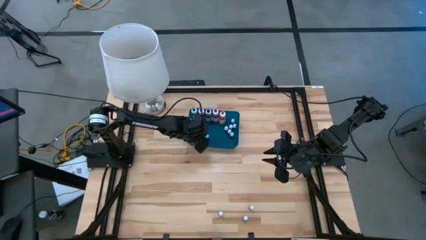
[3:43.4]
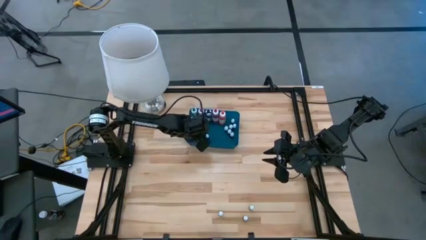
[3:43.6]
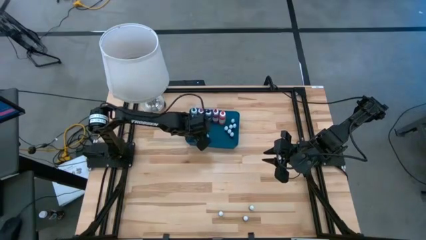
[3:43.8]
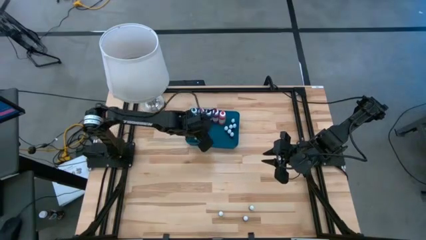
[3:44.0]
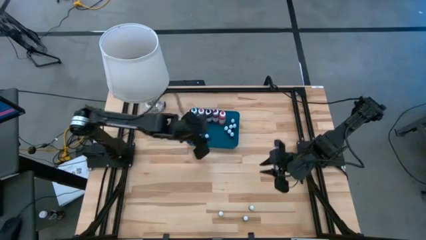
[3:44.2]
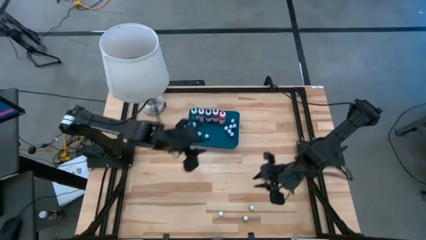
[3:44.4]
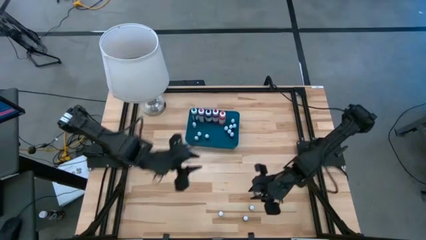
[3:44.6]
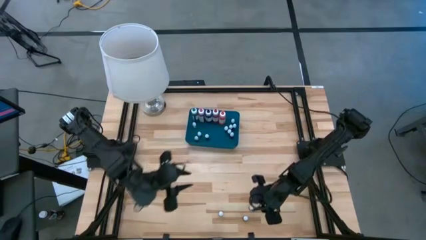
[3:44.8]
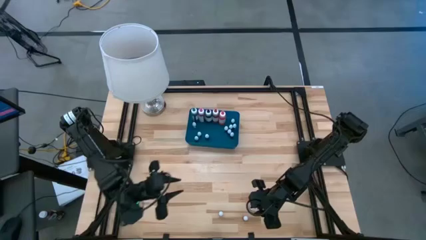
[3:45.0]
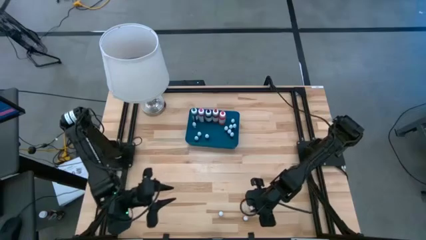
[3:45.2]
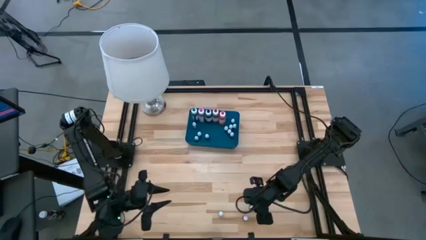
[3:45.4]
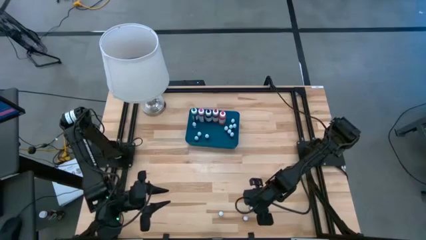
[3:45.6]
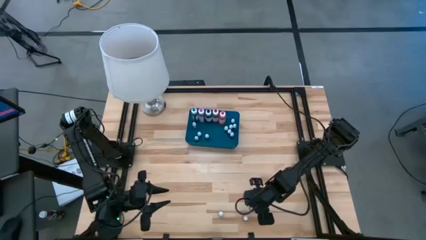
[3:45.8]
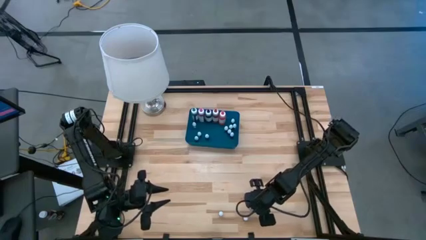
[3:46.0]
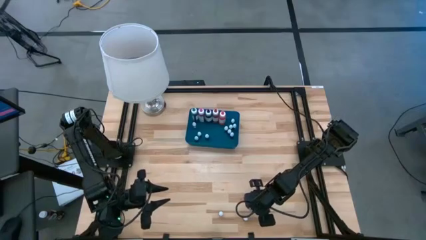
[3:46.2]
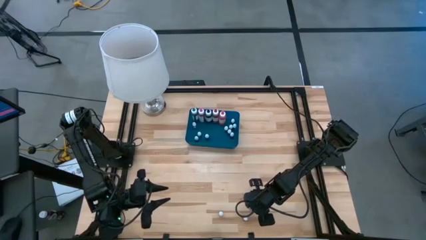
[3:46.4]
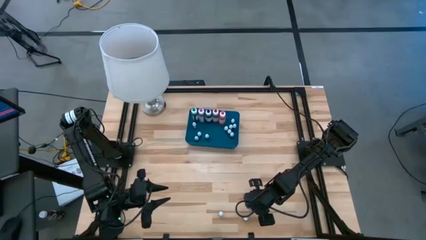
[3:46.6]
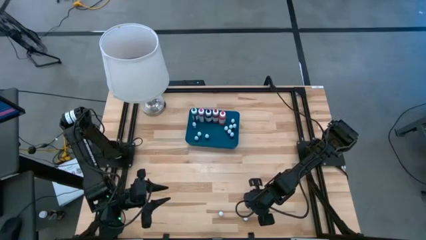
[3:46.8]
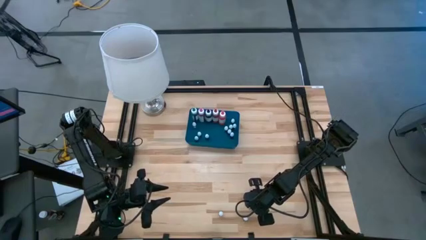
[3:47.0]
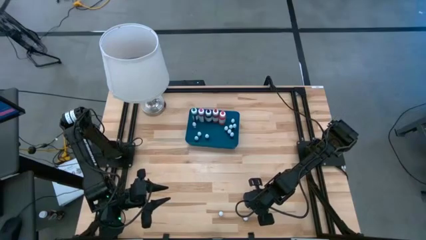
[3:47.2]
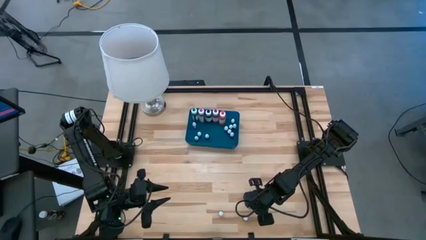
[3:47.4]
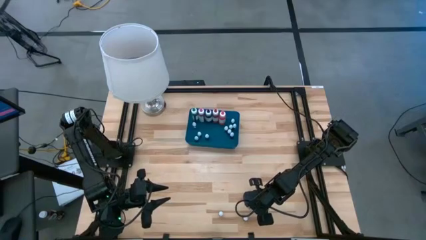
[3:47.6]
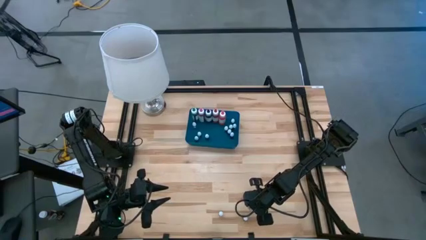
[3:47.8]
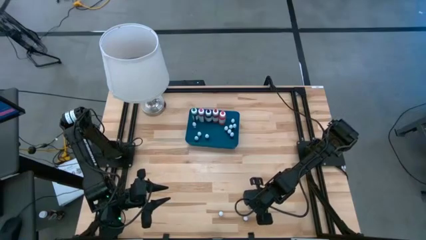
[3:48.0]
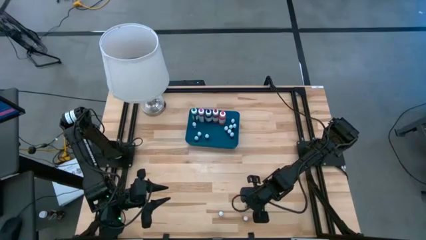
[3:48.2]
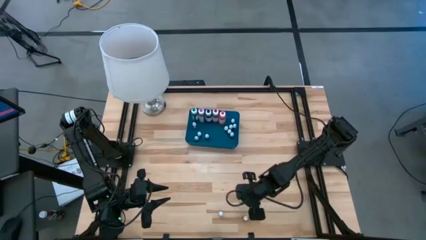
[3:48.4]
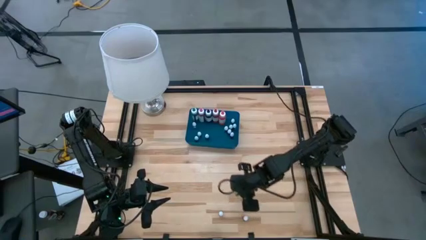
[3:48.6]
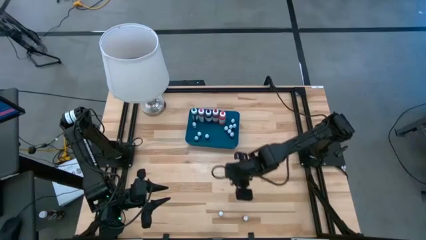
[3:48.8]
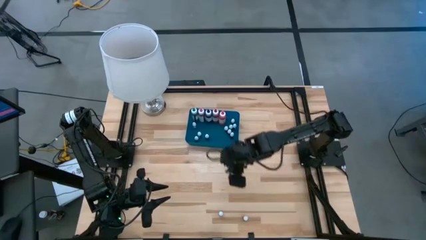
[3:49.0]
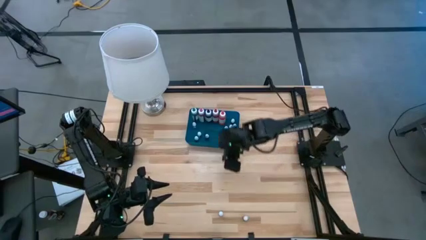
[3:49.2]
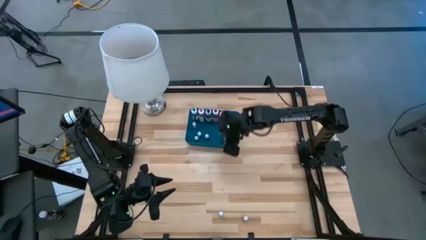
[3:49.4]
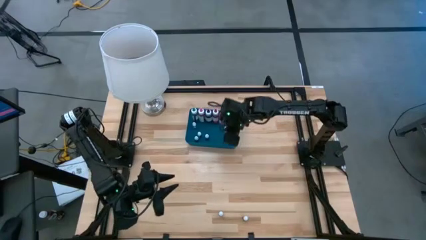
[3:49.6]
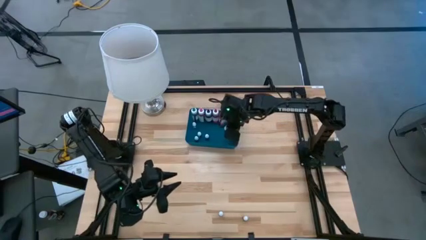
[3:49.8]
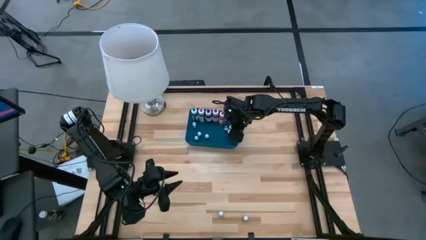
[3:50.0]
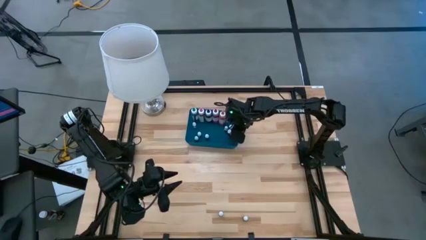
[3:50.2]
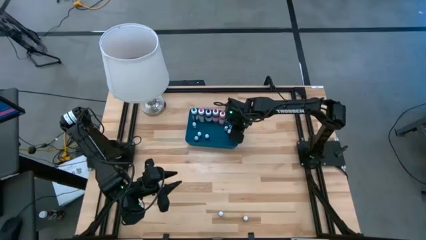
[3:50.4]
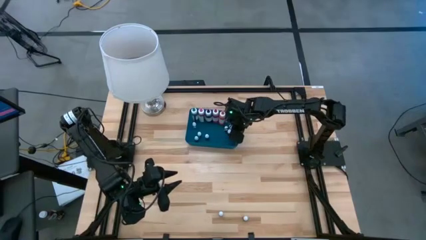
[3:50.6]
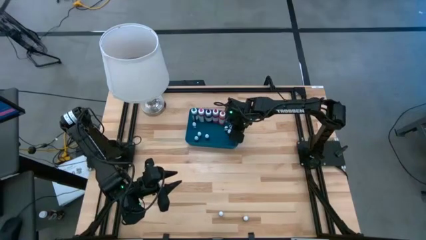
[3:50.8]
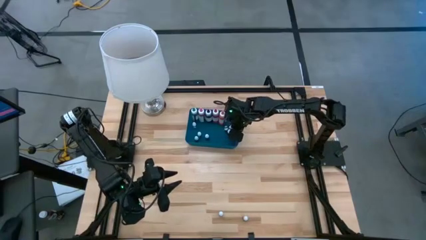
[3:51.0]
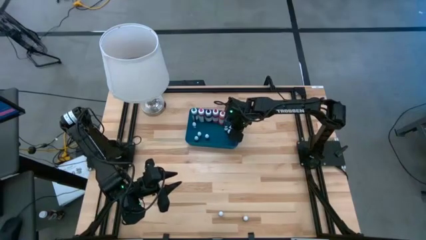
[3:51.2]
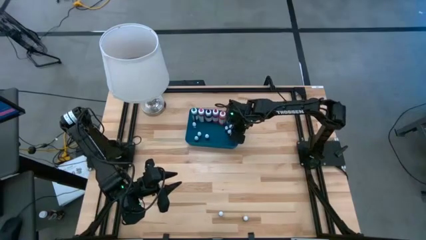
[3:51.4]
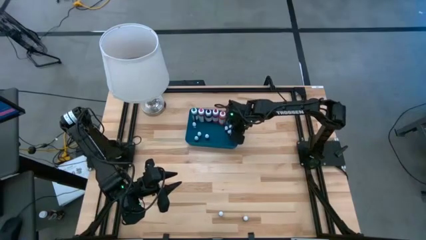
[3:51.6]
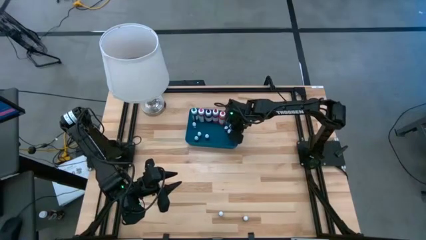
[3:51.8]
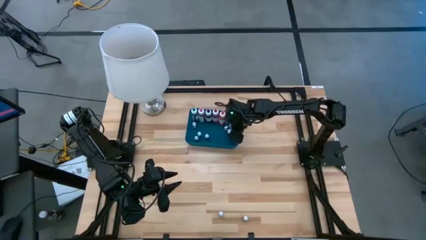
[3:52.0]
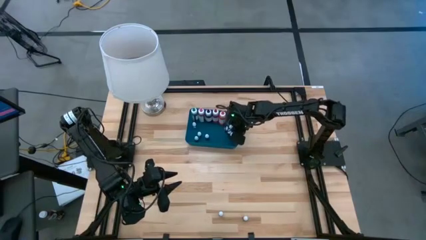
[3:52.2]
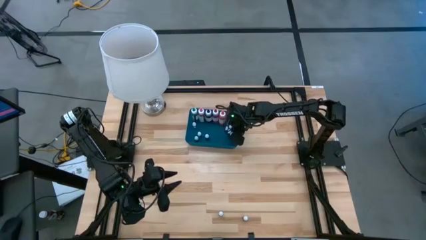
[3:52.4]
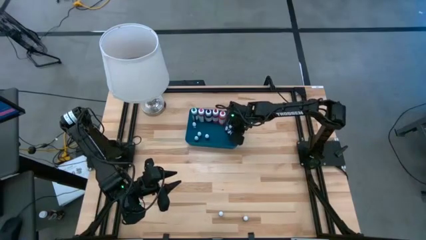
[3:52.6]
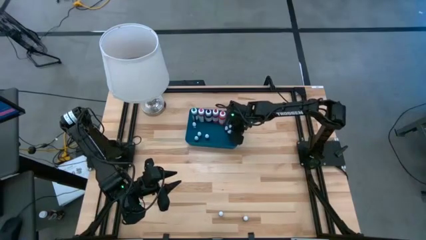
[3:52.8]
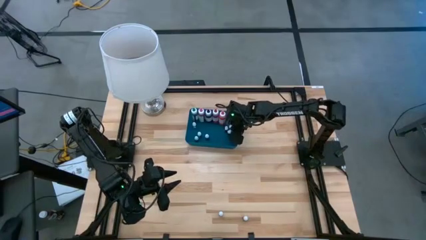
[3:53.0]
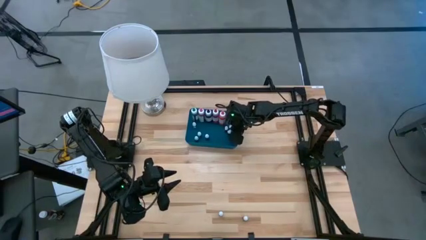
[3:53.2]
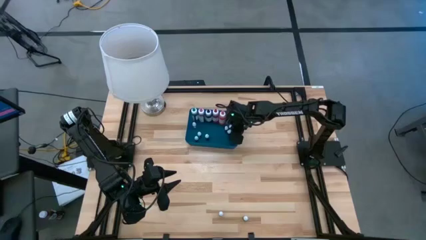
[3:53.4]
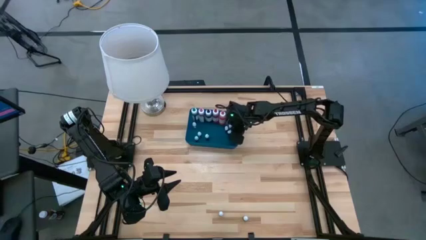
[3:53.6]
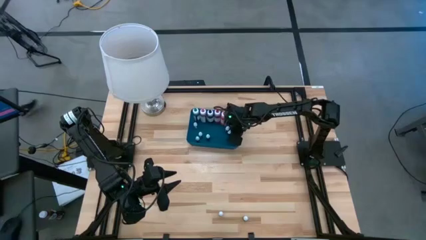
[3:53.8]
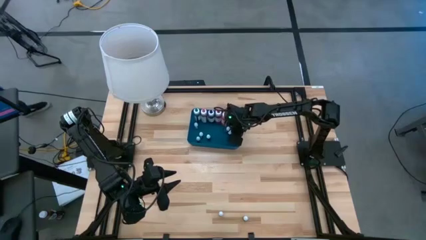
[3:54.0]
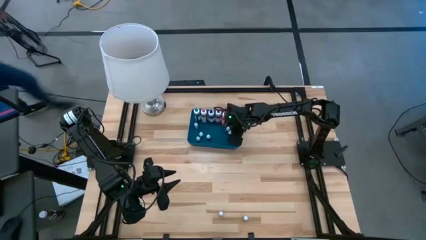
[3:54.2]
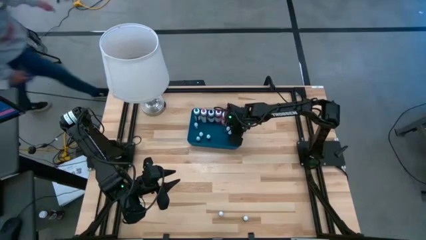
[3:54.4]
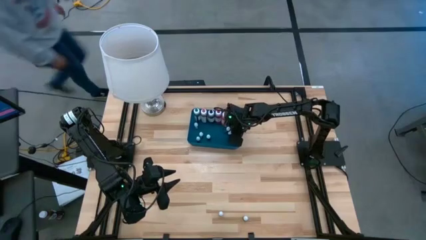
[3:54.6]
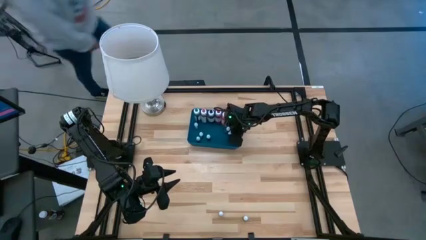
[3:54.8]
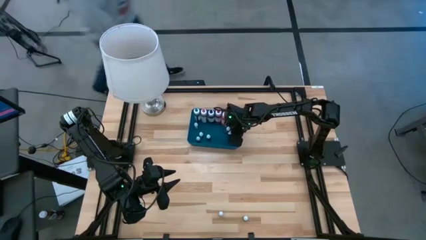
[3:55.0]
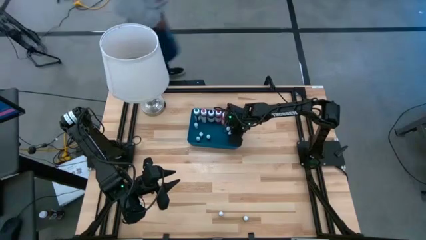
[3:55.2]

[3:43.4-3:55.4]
Task: Pick & Place food coloring
Put the top small green food coloring bottle into the bin
